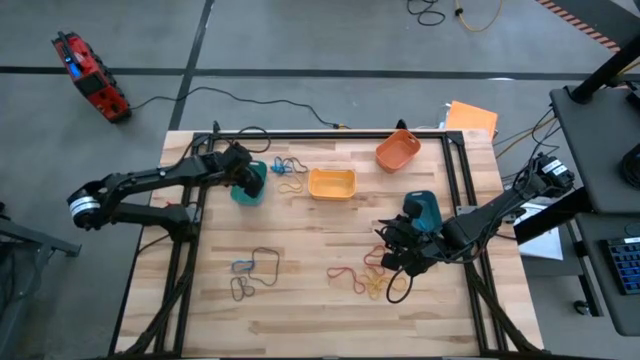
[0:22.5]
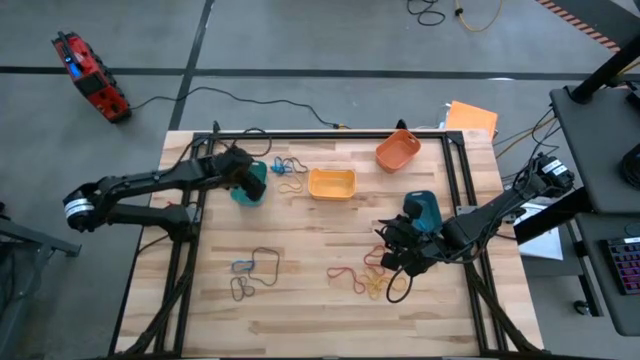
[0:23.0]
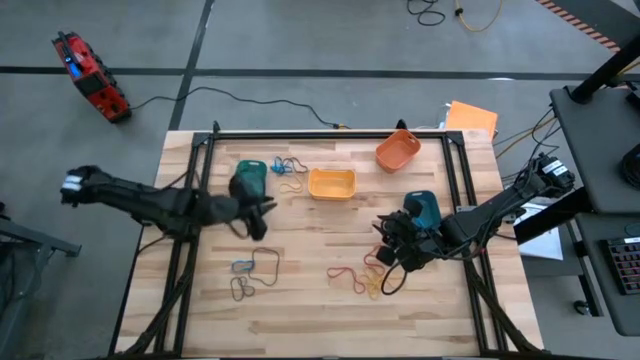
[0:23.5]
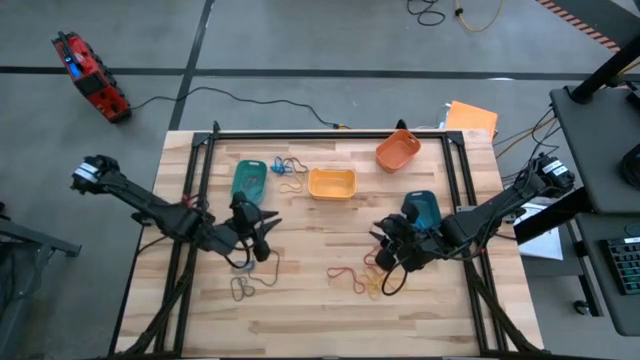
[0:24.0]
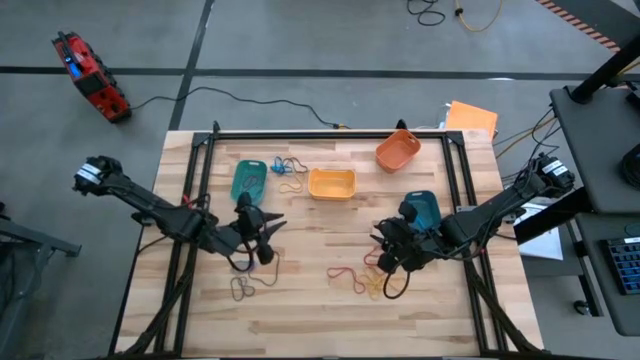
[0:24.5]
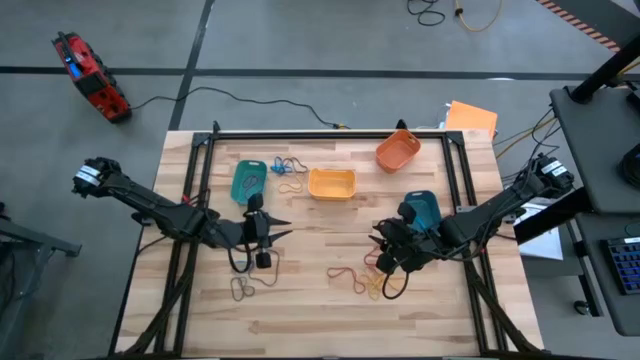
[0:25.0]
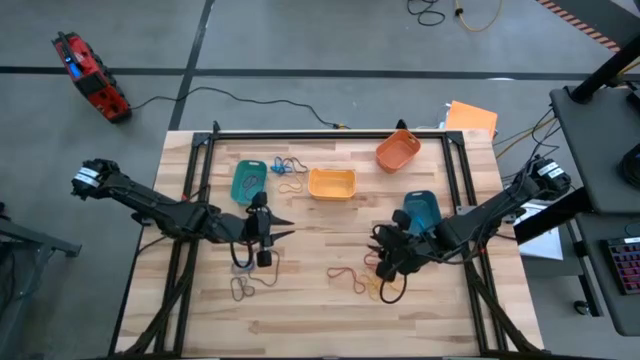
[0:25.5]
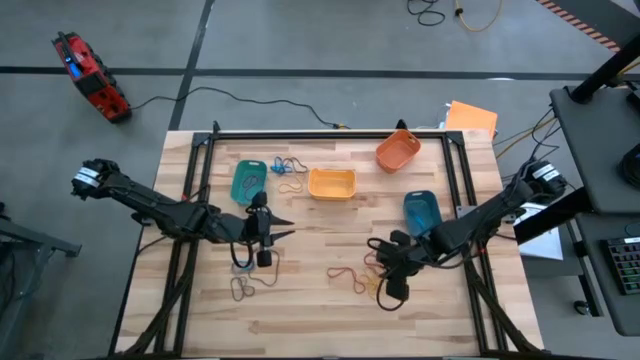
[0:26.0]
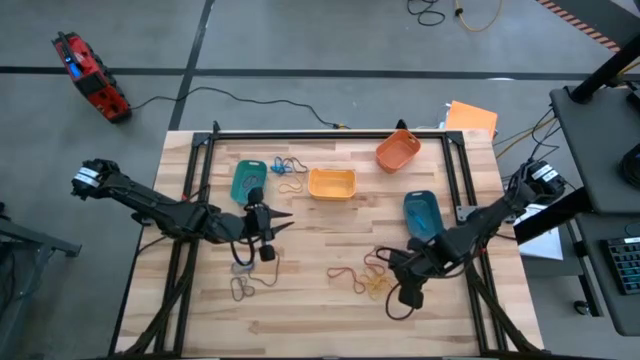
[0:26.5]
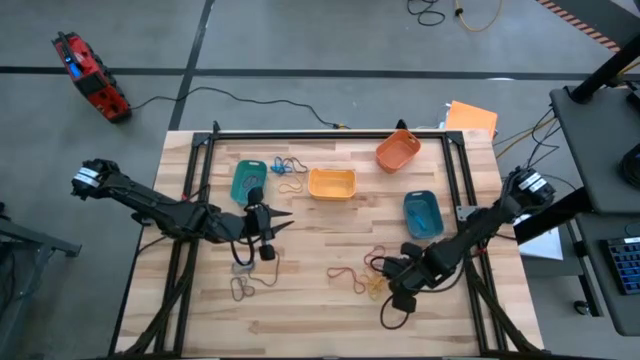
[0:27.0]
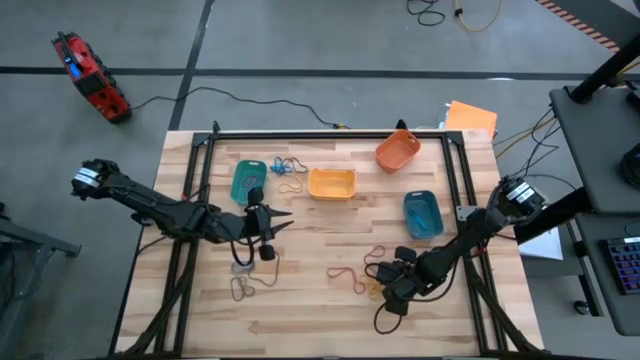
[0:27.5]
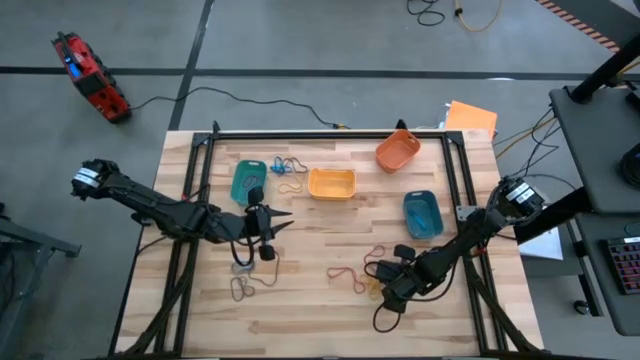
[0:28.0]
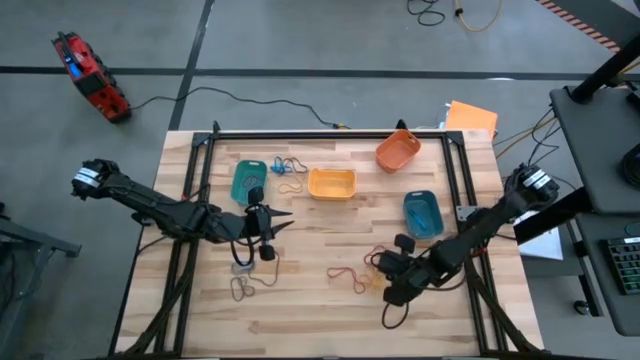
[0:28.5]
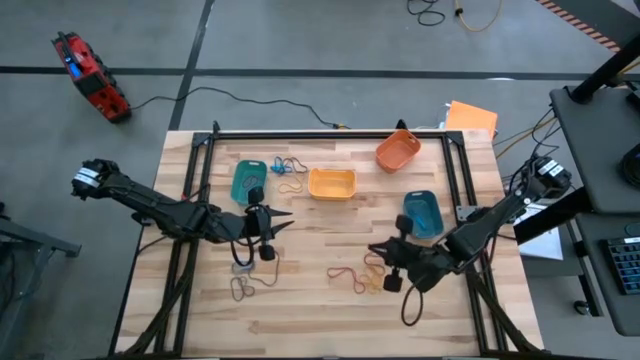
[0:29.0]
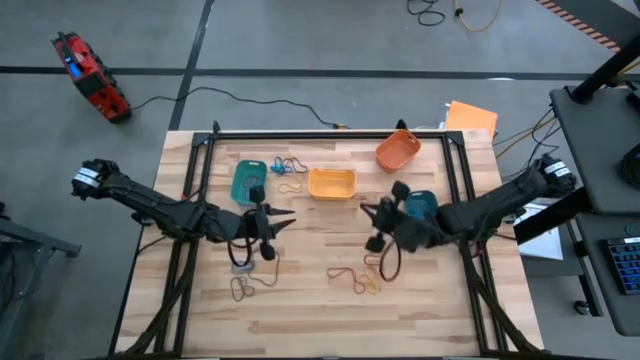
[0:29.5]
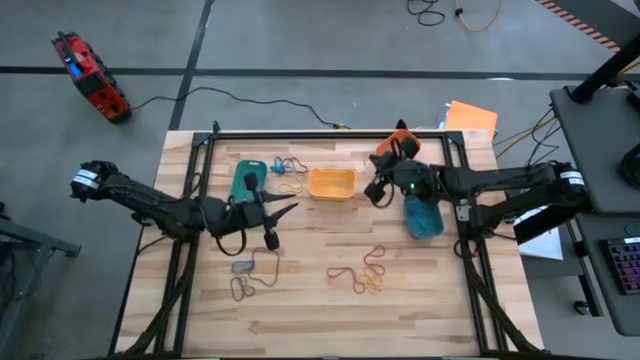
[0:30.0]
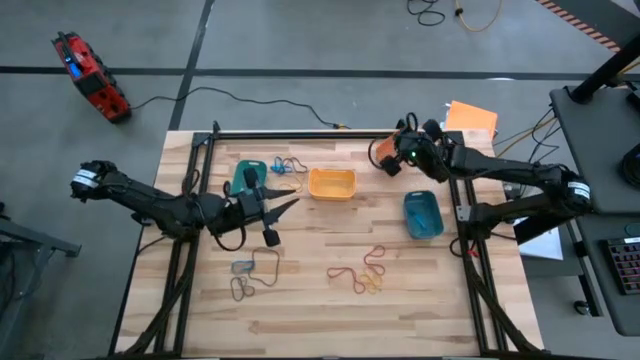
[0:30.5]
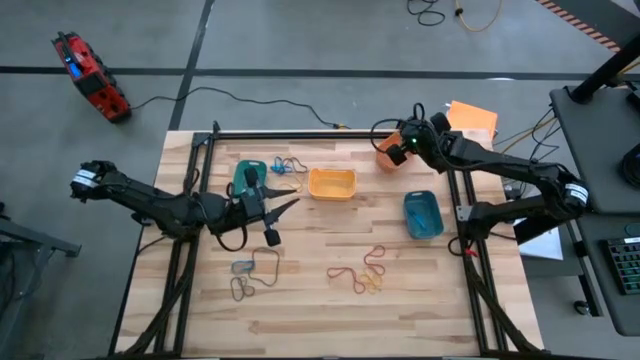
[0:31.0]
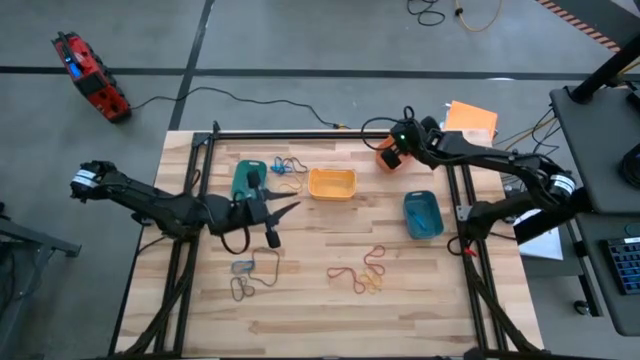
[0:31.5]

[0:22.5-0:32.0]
Task: Sort rubber bands into baskets
Put the yellow rubberband into the orange bin

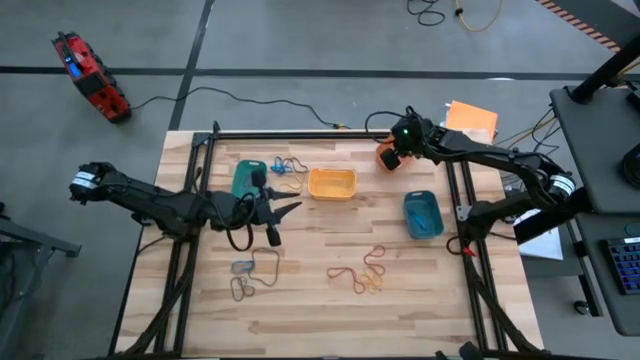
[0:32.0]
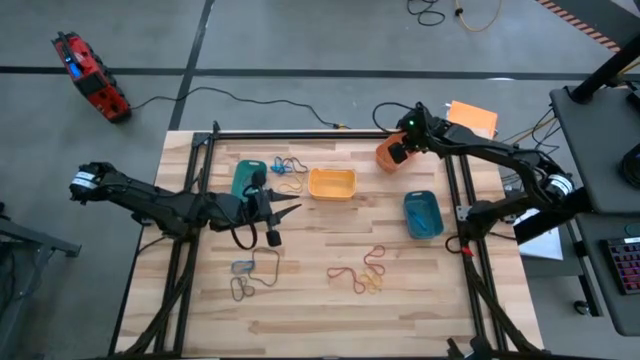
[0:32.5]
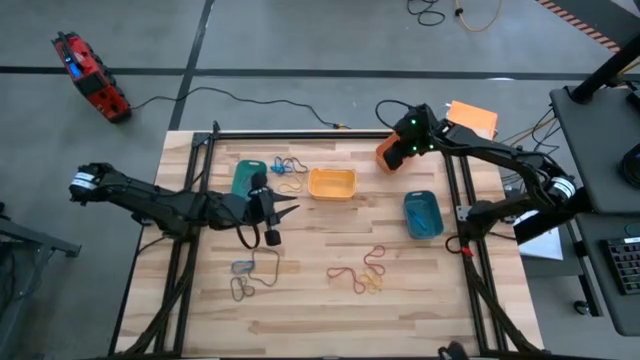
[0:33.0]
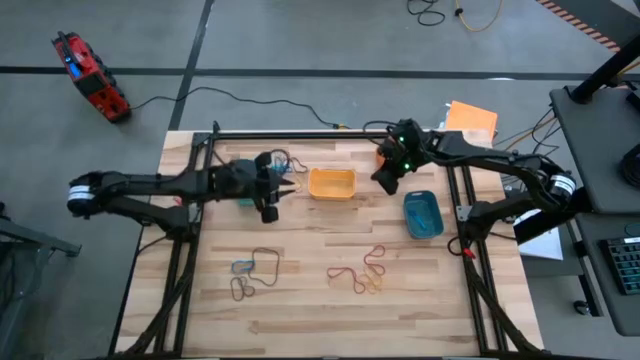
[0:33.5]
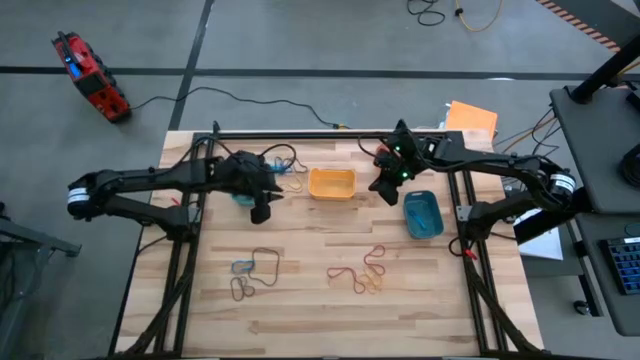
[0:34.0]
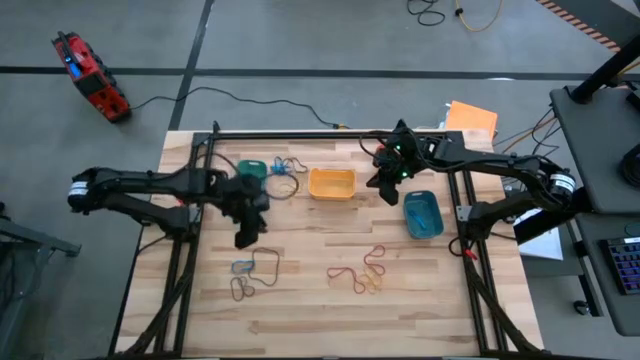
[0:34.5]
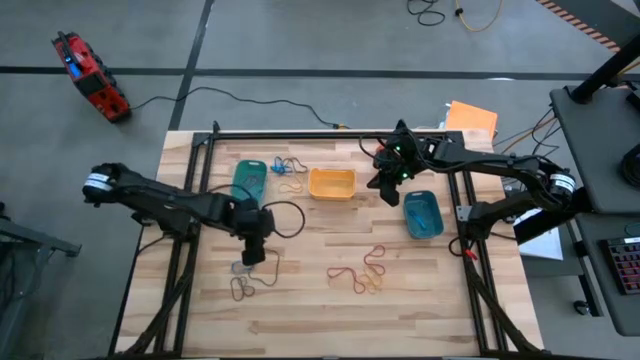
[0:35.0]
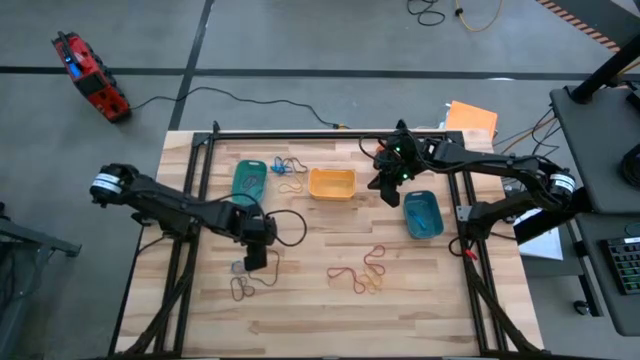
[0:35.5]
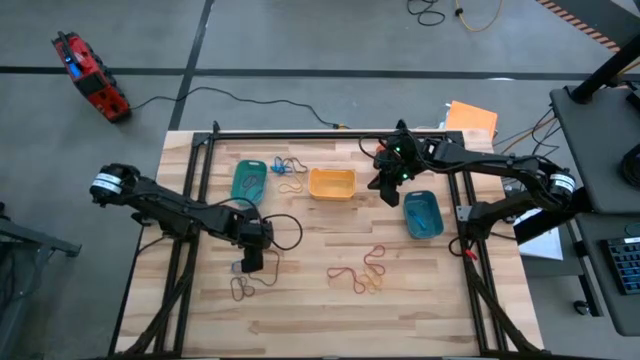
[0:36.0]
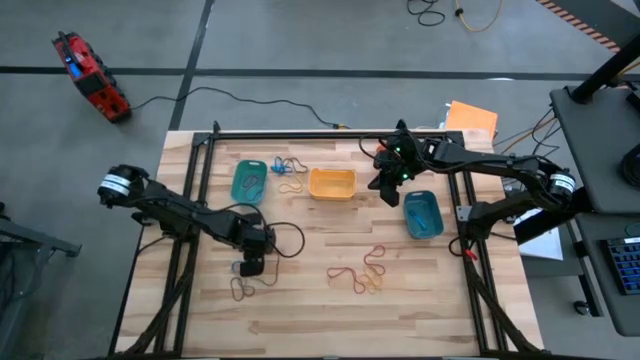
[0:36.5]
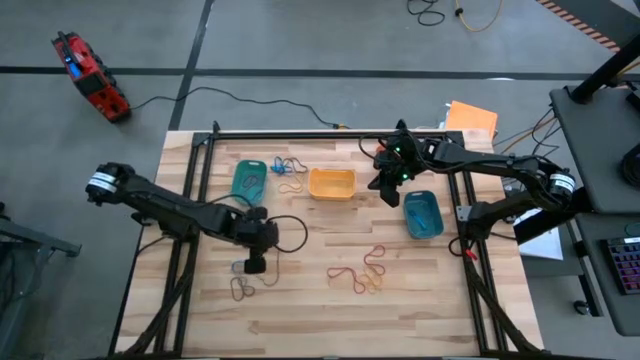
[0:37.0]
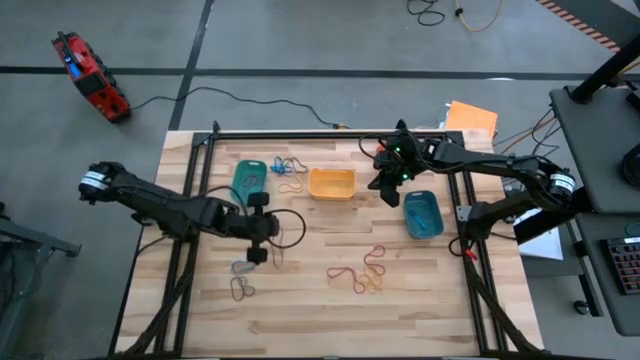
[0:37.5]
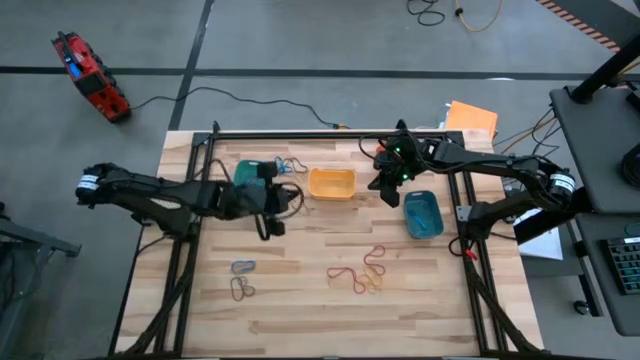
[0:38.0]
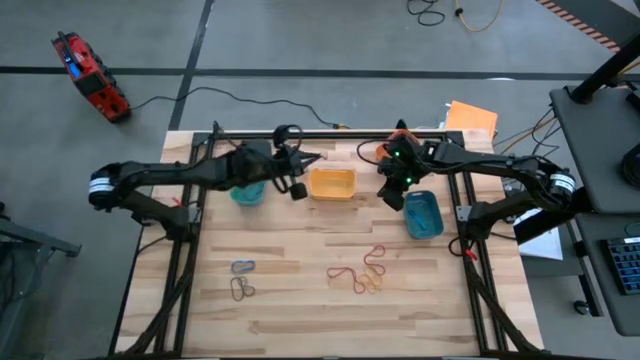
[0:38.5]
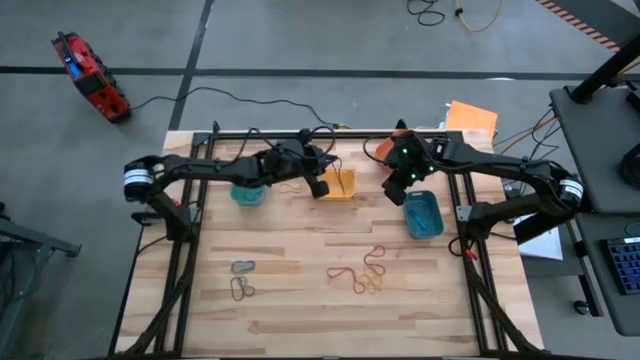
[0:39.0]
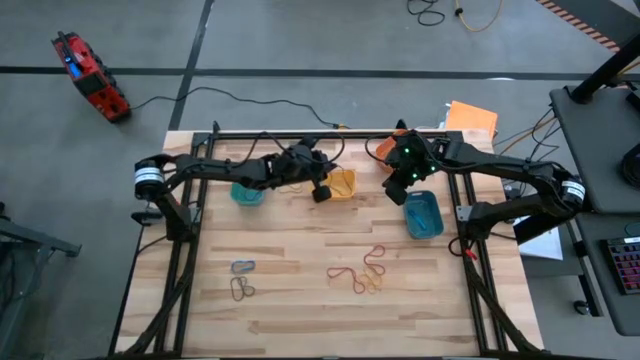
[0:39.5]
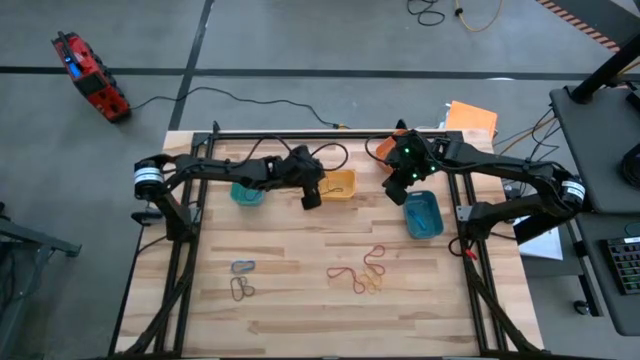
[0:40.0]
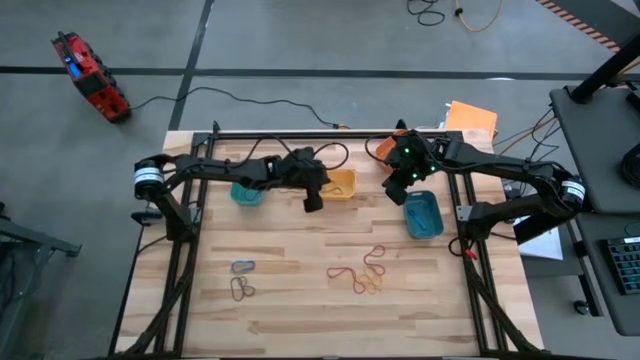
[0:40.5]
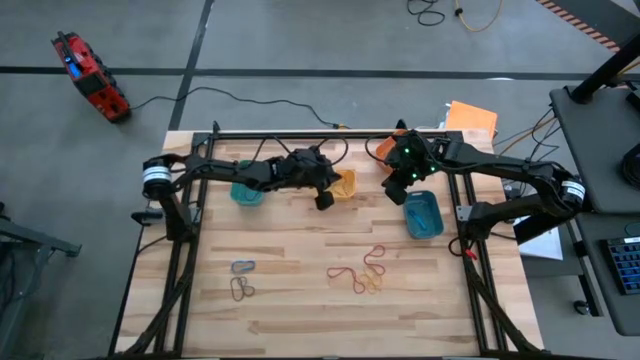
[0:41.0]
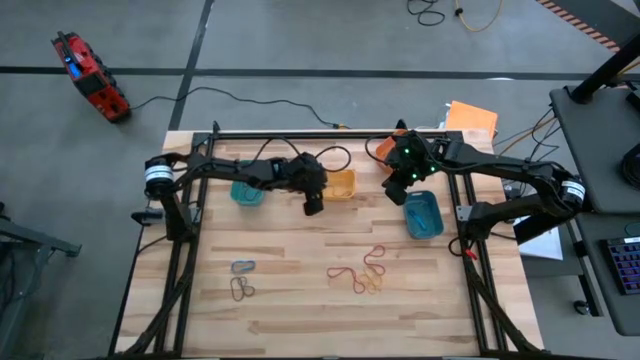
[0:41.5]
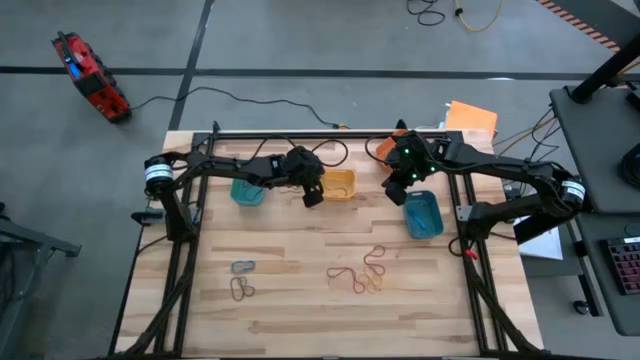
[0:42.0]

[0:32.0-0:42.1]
Put the black rubberband into the yellow bin

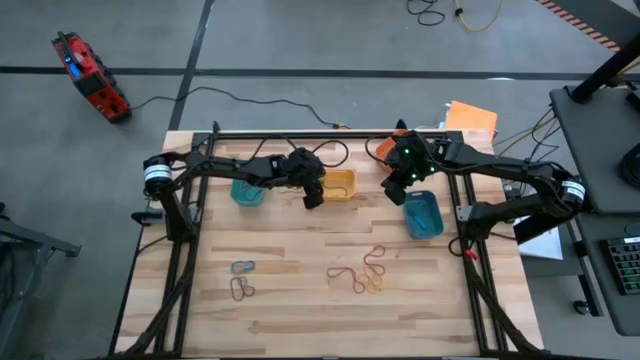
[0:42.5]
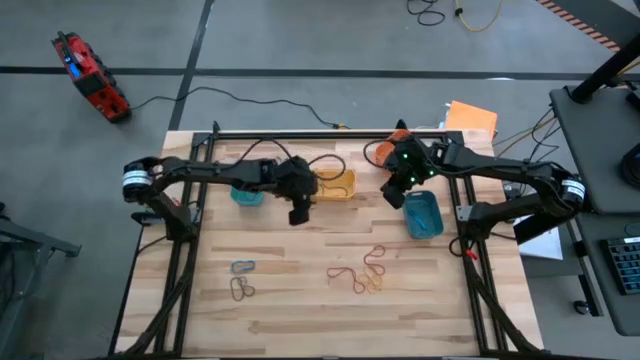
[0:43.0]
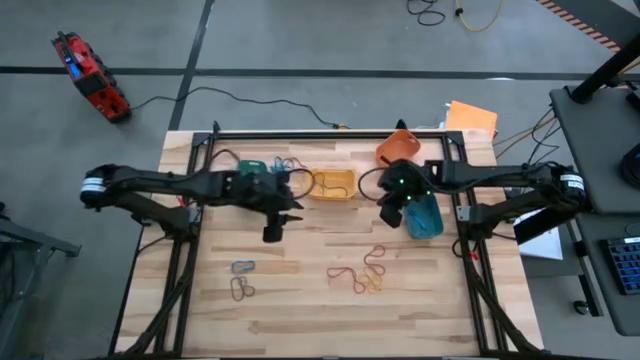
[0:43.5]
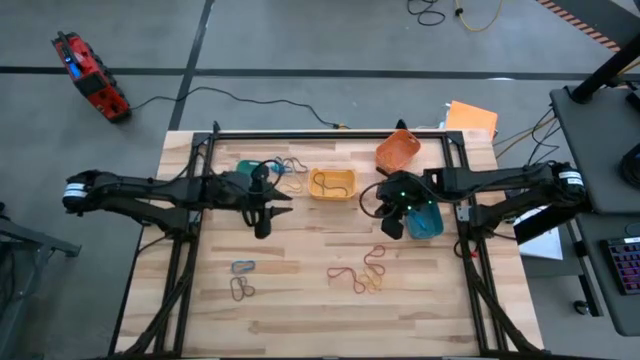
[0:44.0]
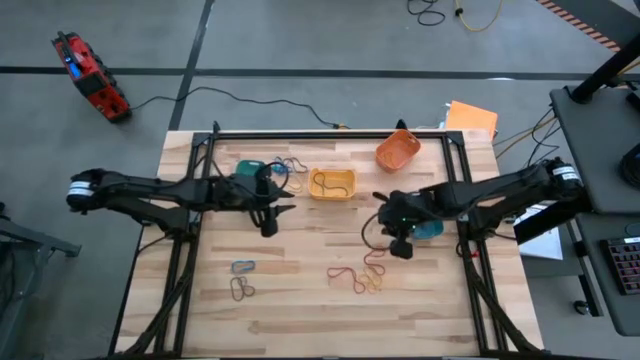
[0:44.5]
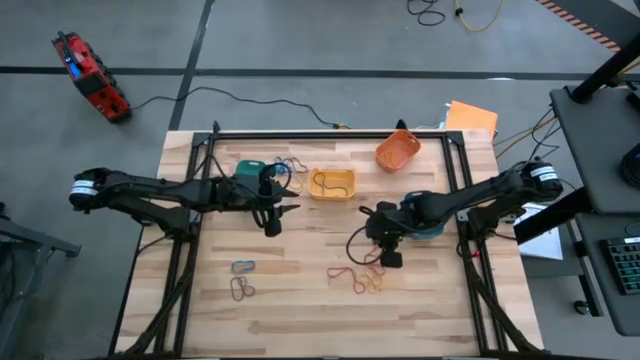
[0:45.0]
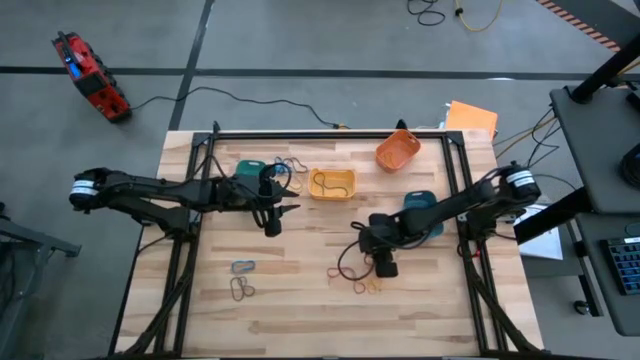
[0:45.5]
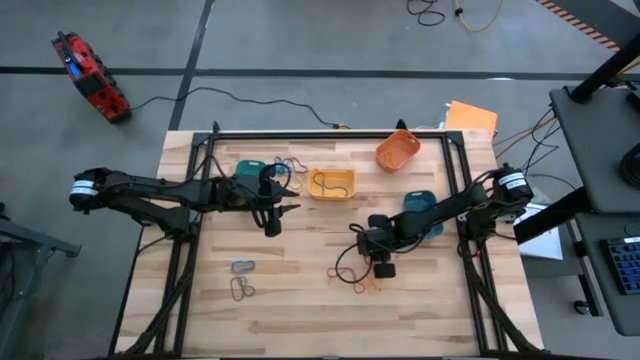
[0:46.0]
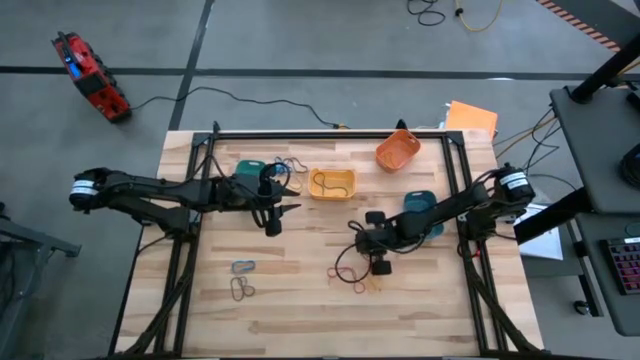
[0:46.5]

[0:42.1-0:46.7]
Put the red rubberband into the green bin
